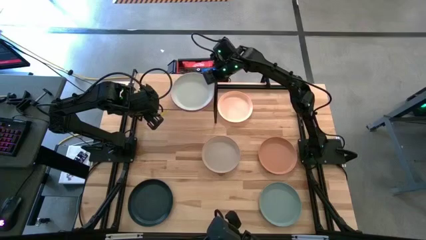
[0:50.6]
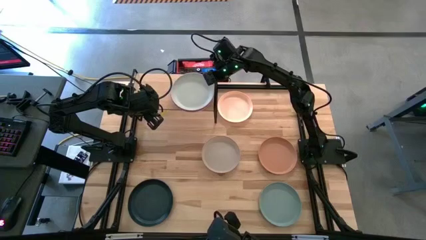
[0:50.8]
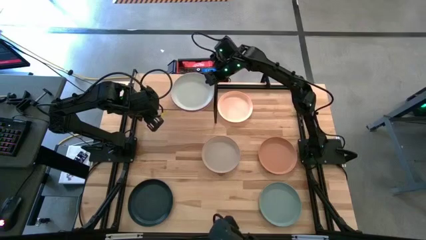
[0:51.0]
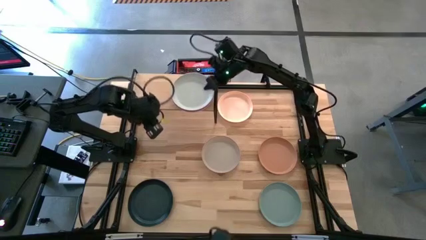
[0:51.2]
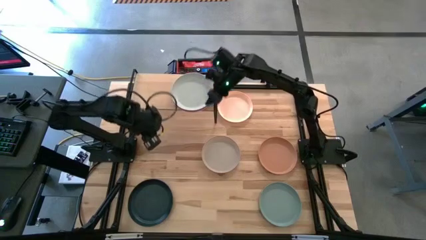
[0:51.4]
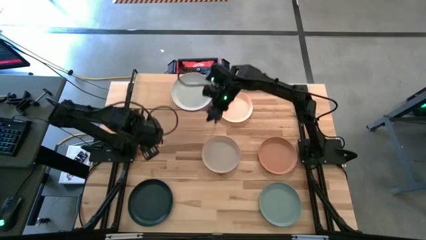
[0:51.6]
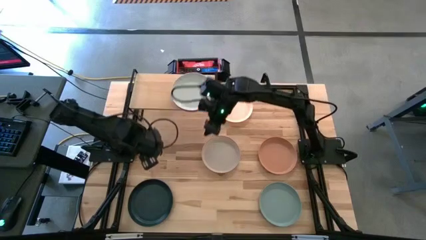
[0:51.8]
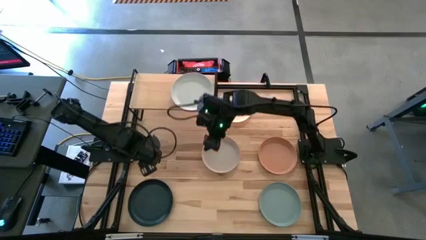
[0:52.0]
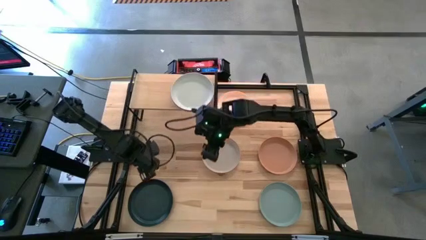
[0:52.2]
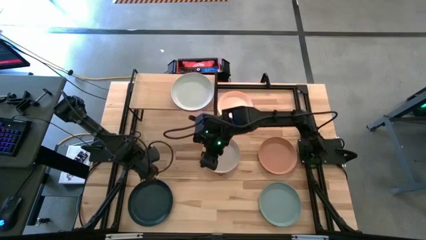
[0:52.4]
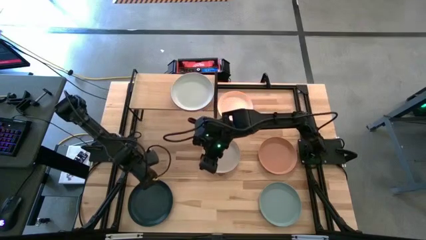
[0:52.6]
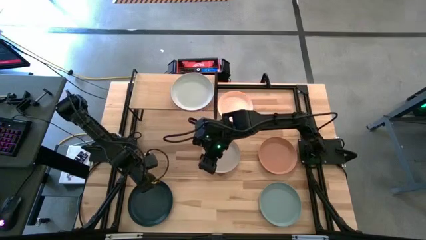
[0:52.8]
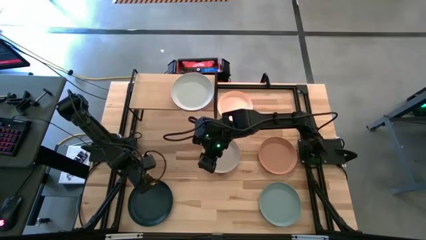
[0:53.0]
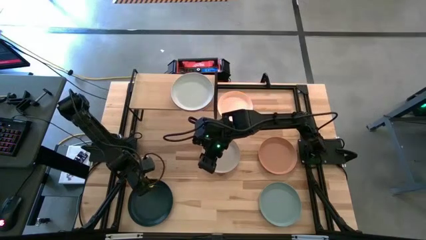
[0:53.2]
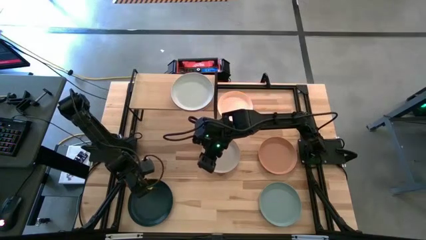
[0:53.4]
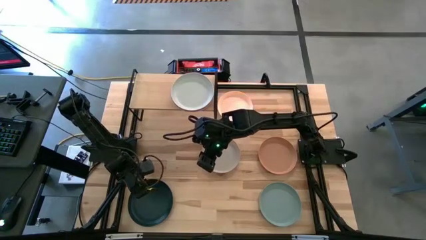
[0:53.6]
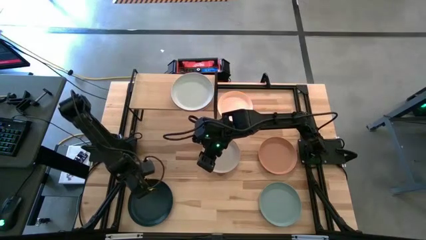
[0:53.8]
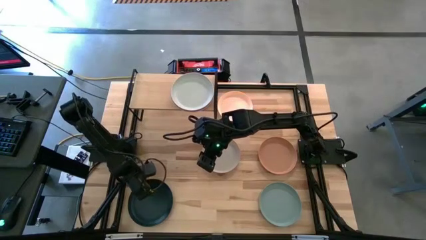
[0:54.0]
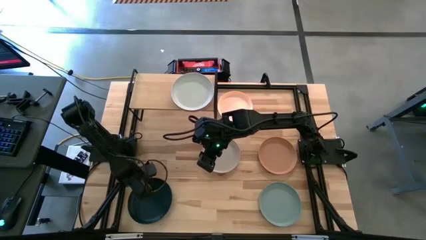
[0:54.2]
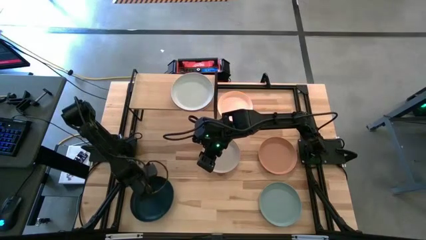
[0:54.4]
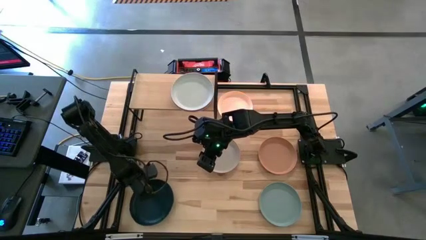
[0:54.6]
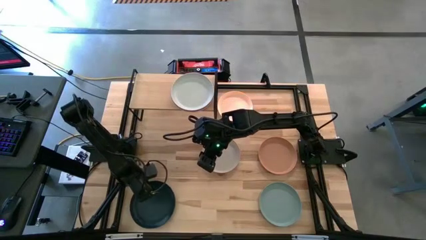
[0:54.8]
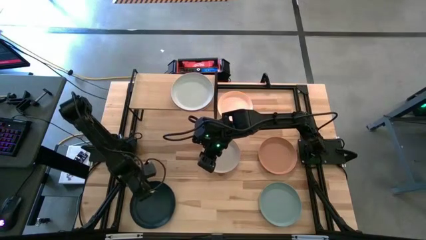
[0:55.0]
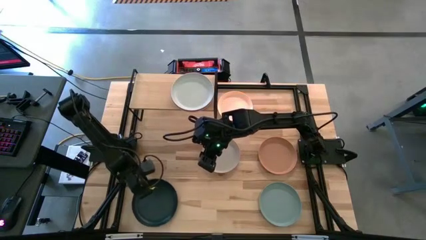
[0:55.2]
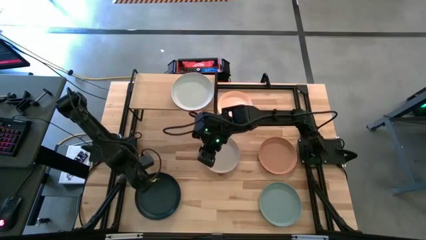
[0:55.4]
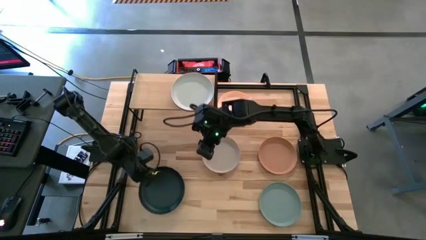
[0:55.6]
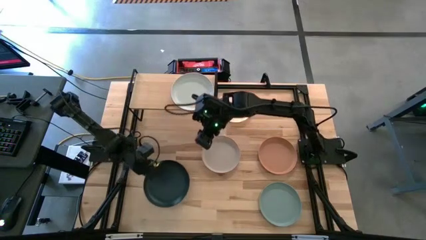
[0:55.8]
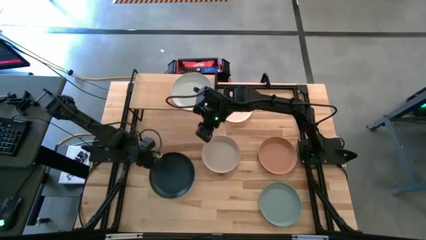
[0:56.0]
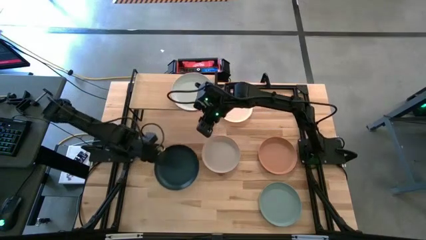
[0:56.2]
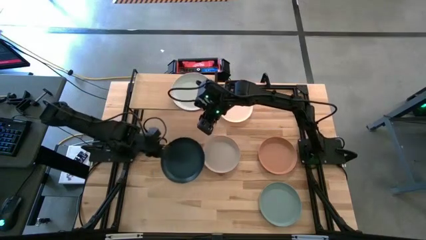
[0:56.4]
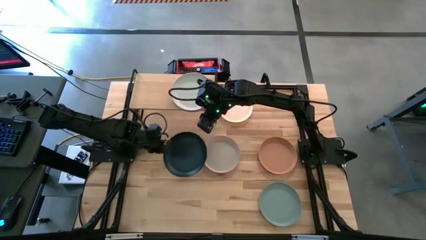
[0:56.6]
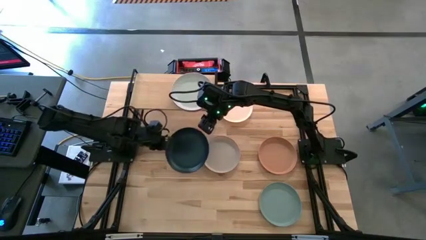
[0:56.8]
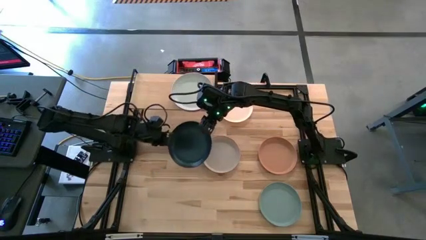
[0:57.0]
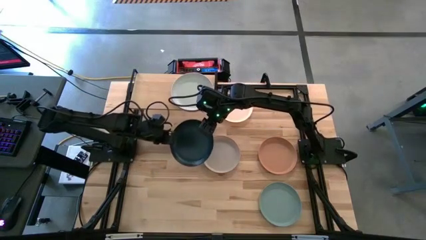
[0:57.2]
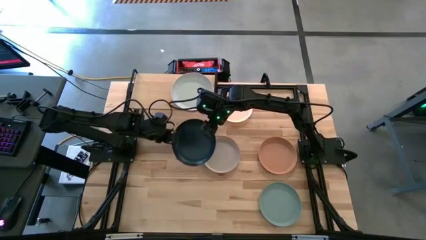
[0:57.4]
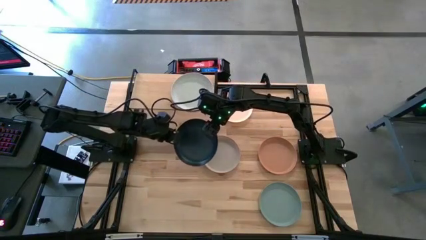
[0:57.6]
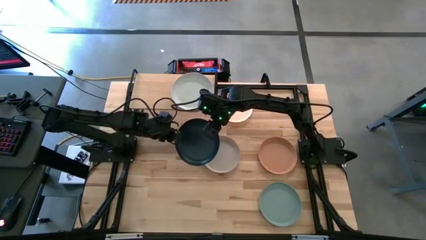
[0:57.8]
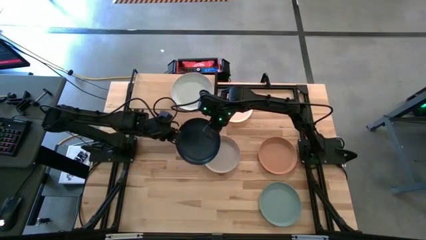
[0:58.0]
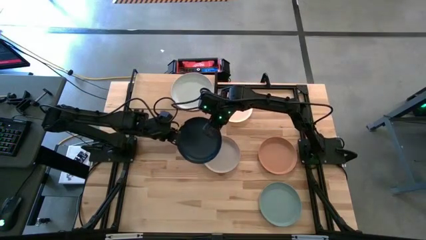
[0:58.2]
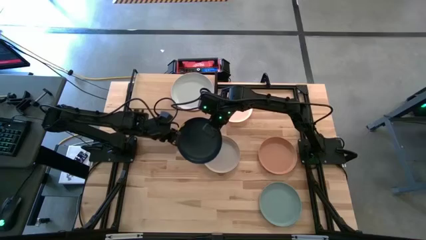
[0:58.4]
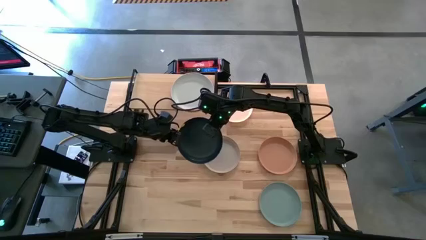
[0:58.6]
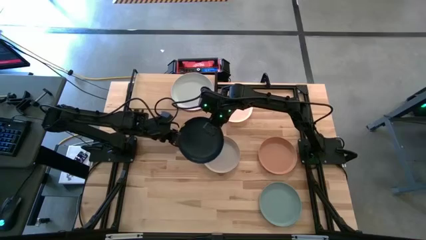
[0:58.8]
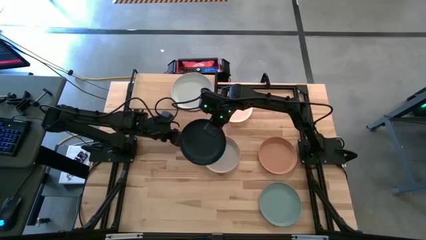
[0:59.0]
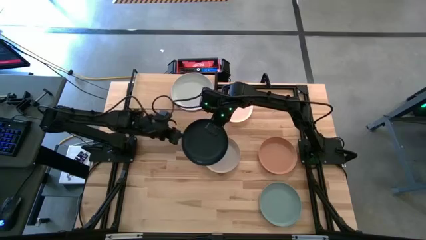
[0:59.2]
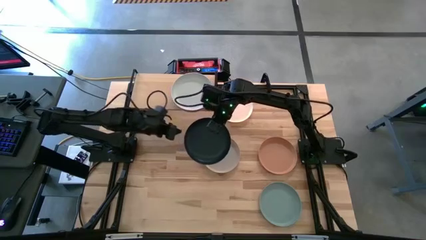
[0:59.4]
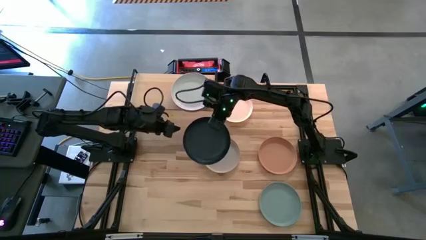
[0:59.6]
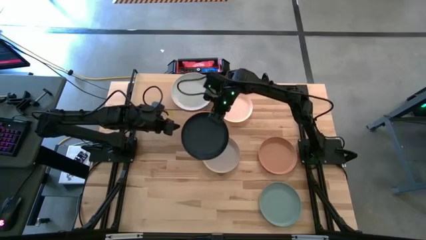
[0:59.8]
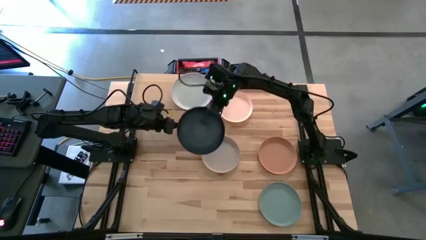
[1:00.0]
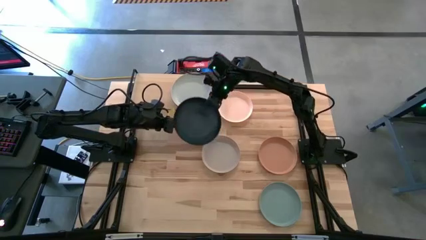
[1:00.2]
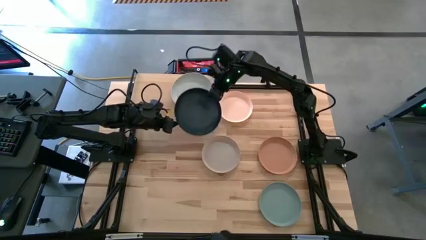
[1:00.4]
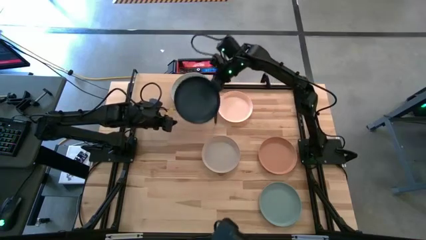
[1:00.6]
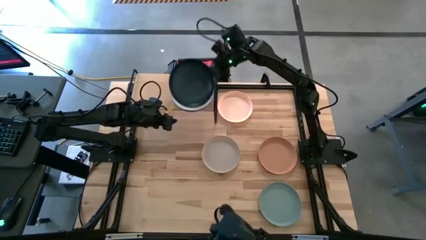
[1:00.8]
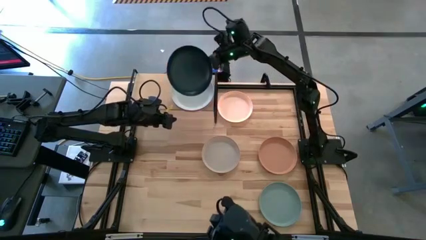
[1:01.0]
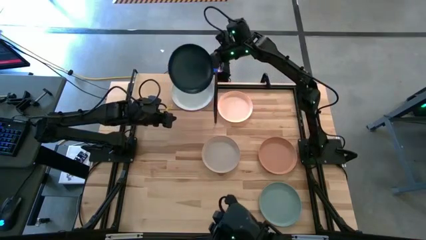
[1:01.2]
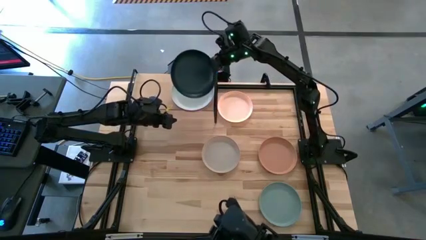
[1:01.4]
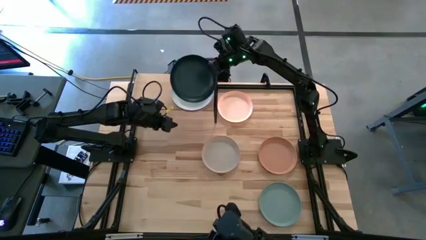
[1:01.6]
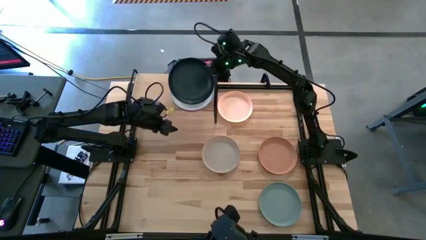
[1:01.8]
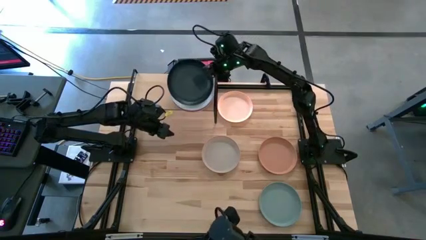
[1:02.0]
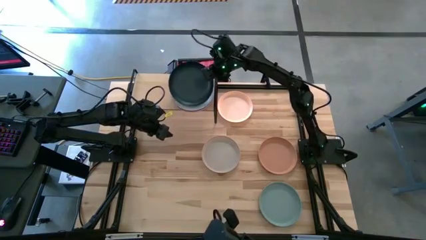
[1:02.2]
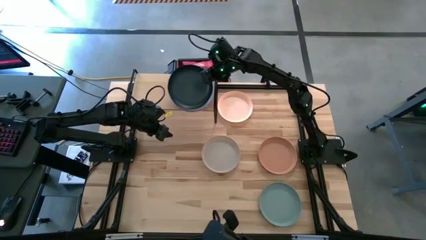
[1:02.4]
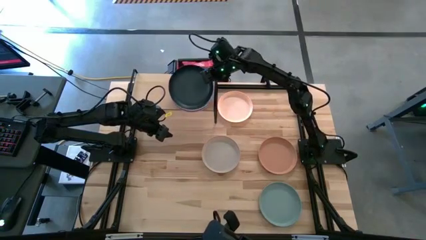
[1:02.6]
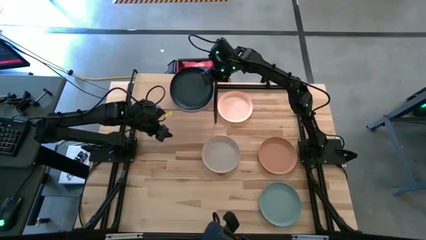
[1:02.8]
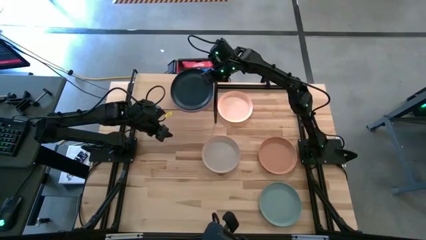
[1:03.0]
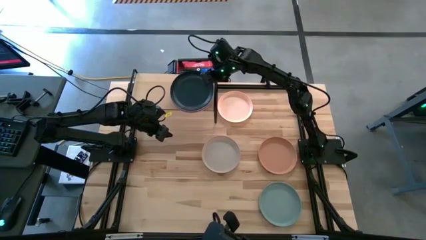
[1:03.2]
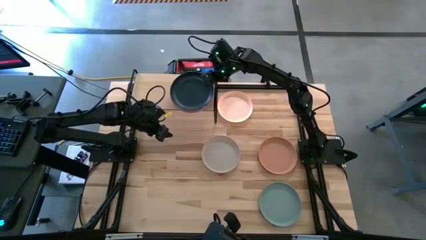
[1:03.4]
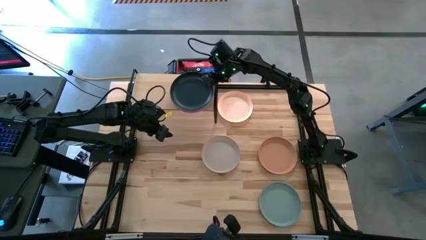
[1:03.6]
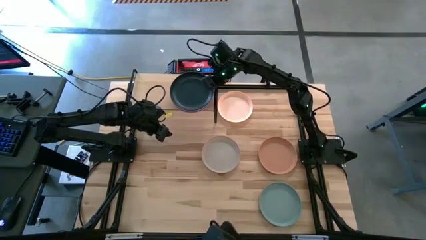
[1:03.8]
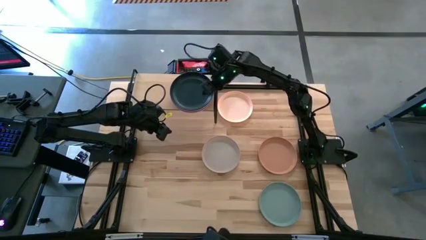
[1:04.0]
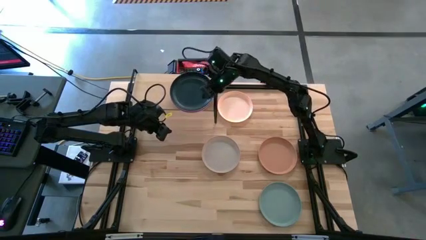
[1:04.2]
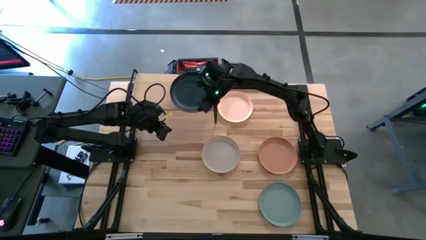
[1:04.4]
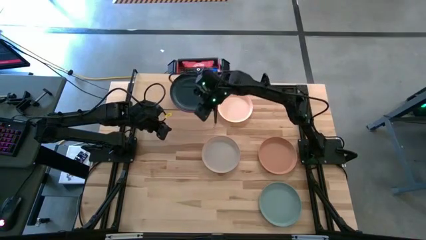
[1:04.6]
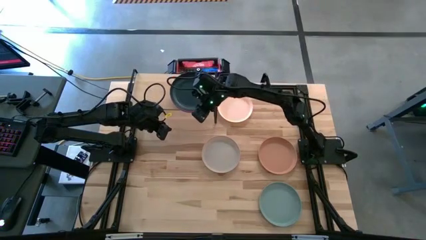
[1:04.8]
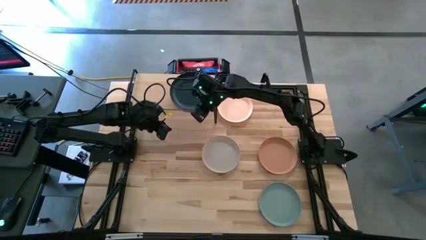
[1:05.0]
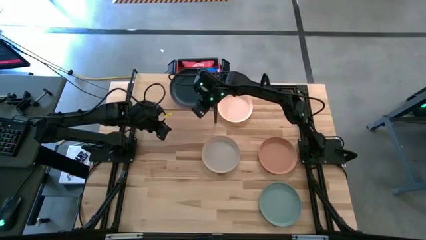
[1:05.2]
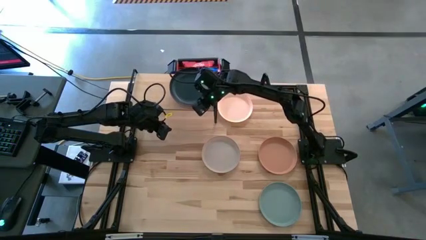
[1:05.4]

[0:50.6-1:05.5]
Task: Place and stack plates onto a shelf
Stack the dark blue plate on top of the white plate on the shelf

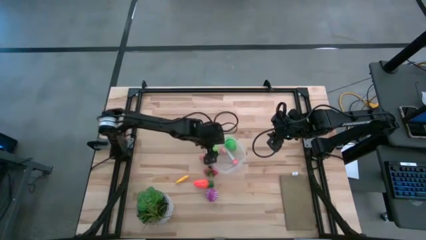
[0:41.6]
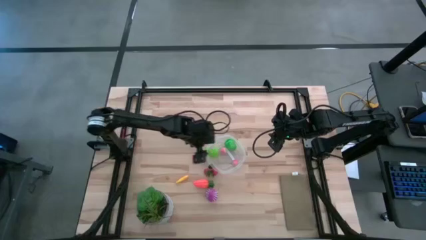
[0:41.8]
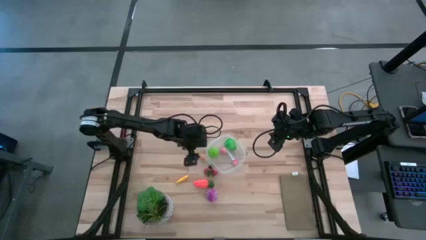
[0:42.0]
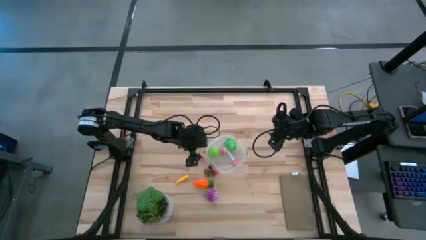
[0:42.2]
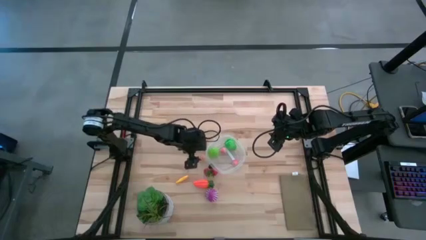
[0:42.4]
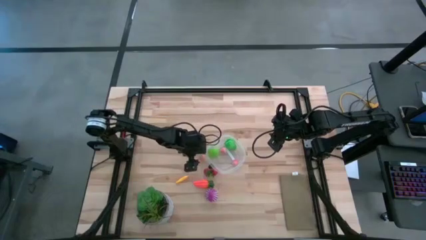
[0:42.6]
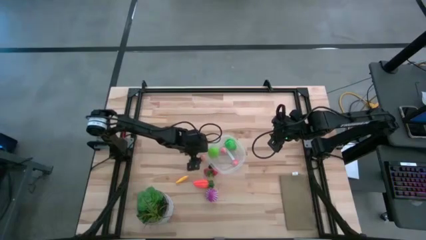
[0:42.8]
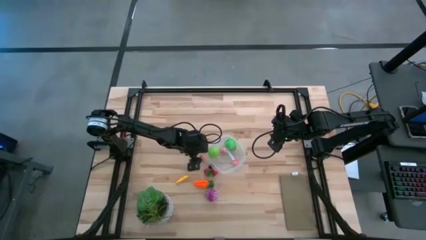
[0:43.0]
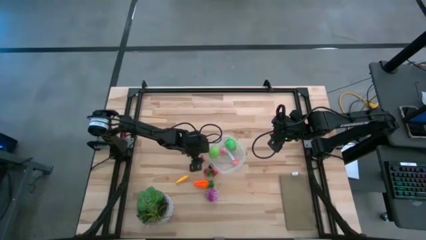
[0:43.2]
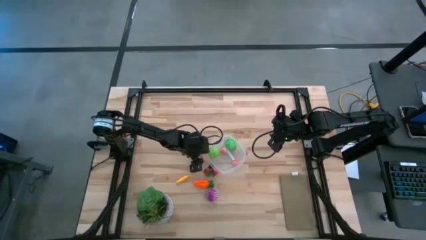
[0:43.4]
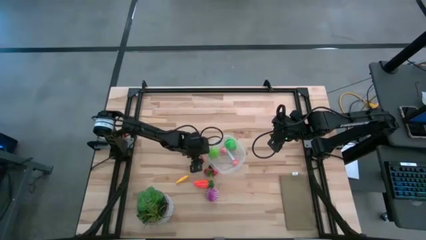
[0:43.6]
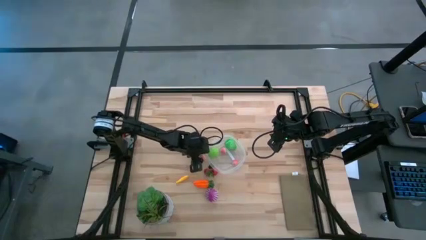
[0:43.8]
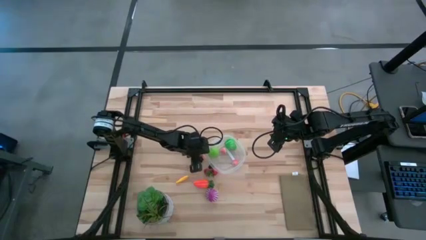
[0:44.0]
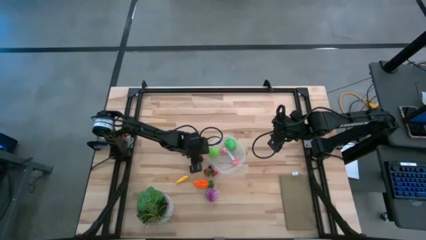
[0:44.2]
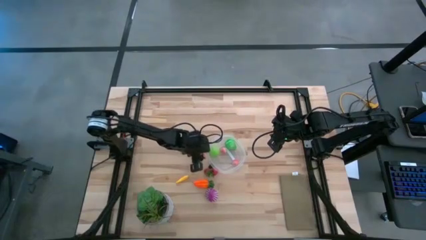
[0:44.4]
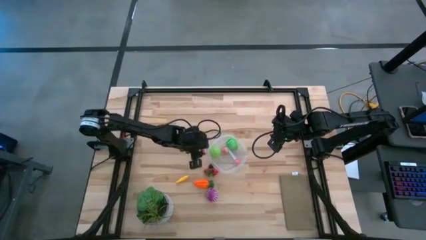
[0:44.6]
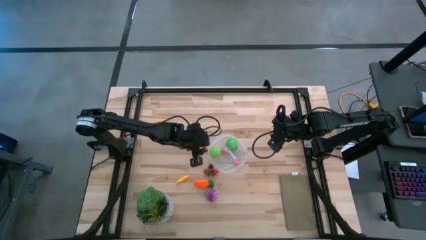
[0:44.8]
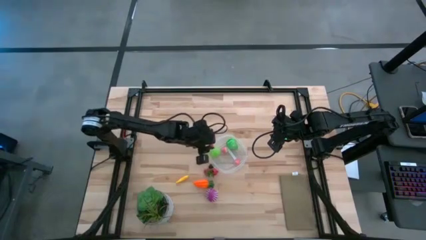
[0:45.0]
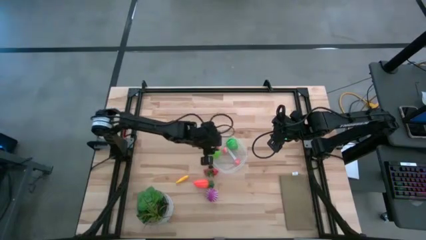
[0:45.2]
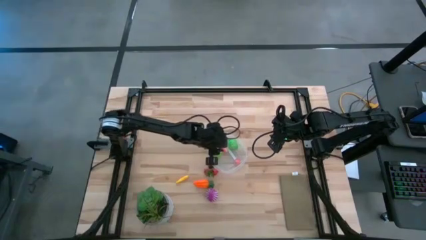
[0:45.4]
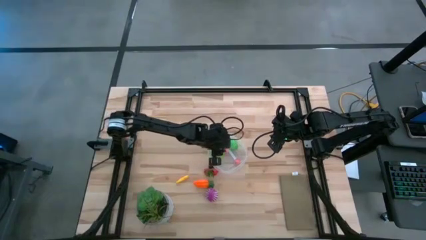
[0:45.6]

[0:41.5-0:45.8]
Task: Pick and placing Produce into tupperware
Put the pink peach into the transparent bin
